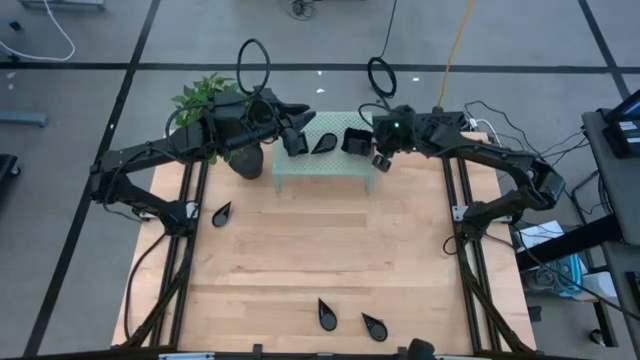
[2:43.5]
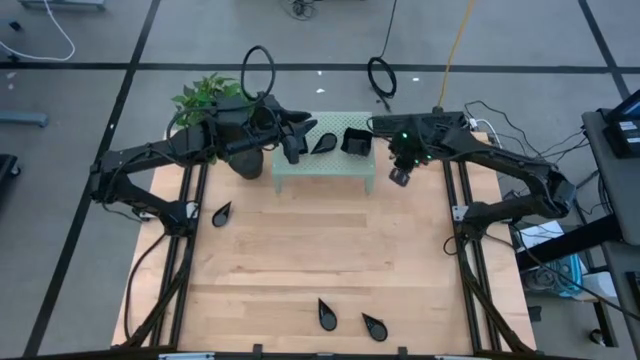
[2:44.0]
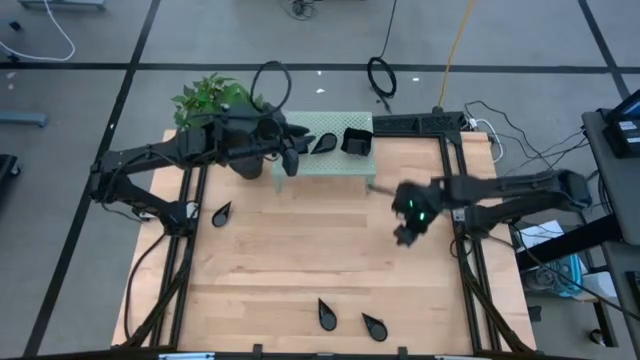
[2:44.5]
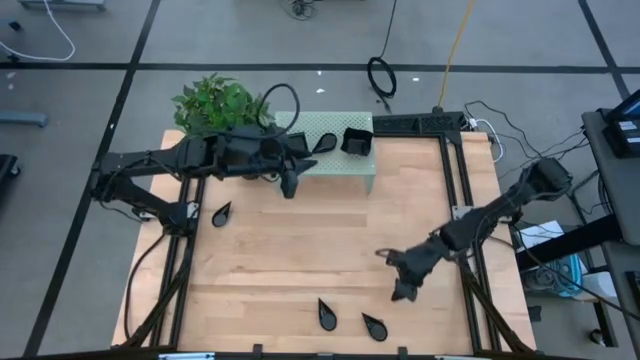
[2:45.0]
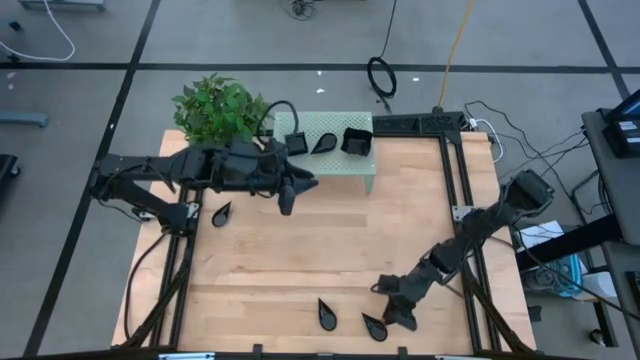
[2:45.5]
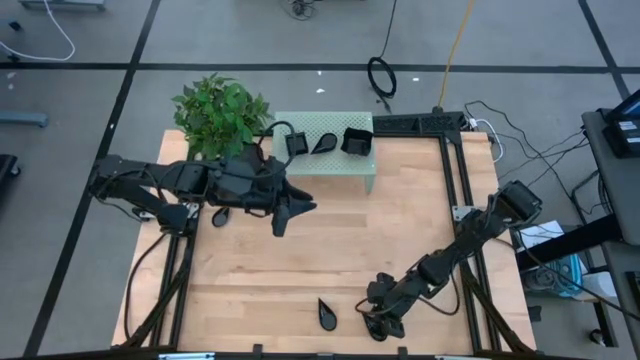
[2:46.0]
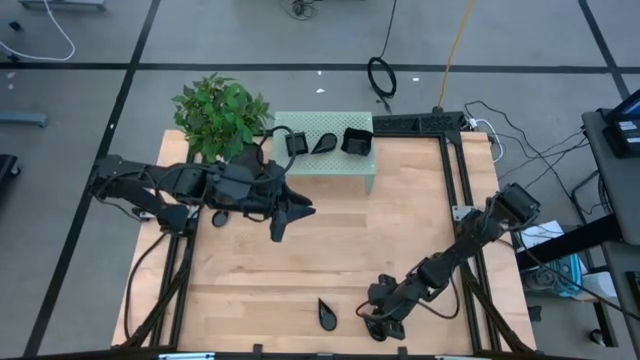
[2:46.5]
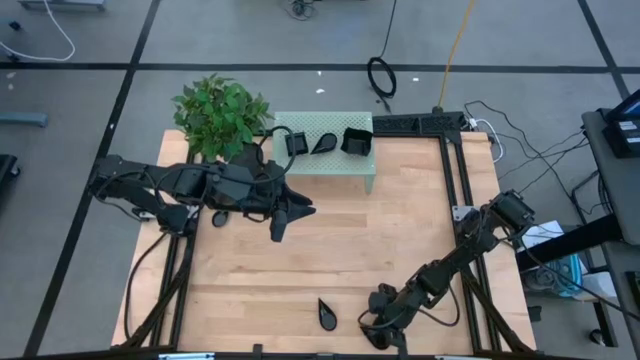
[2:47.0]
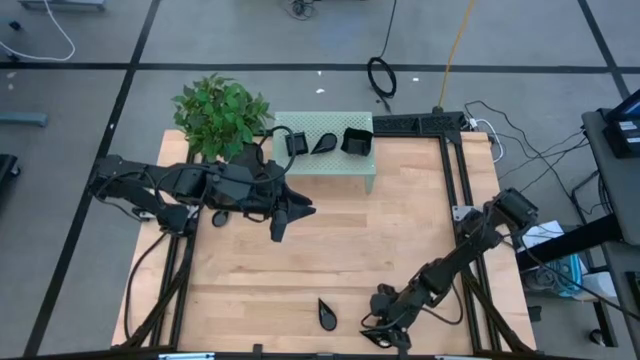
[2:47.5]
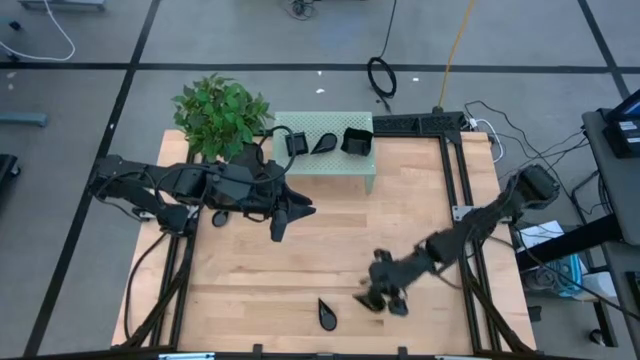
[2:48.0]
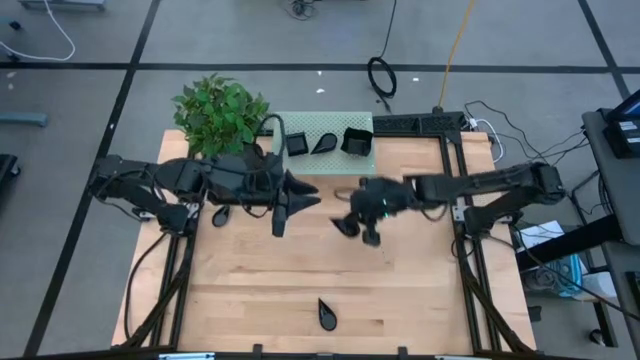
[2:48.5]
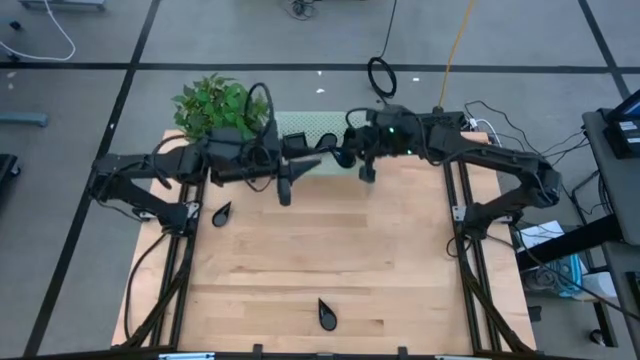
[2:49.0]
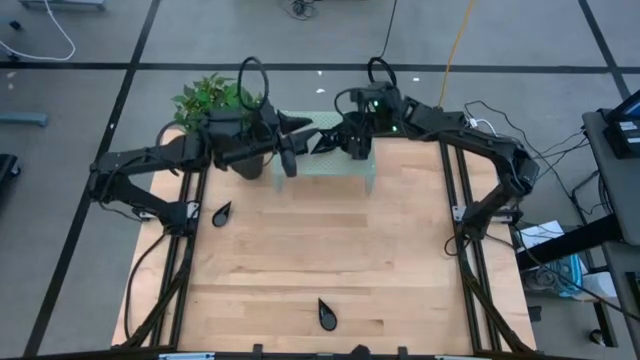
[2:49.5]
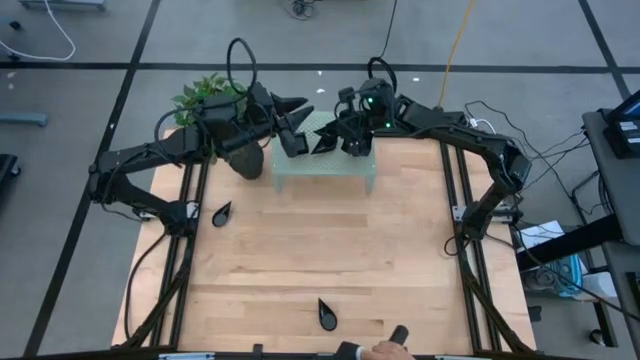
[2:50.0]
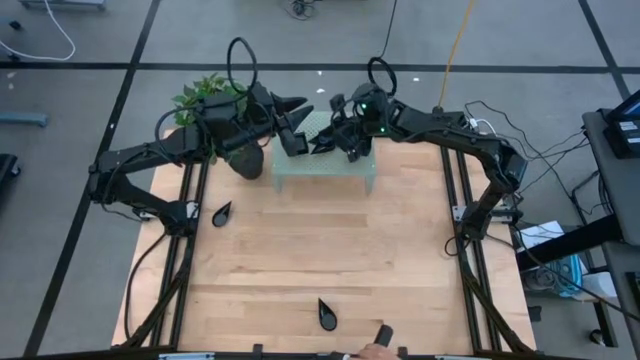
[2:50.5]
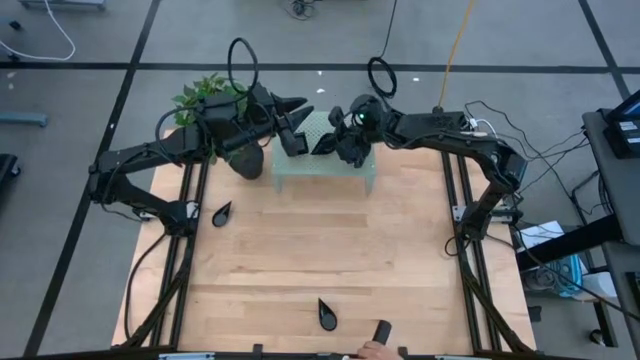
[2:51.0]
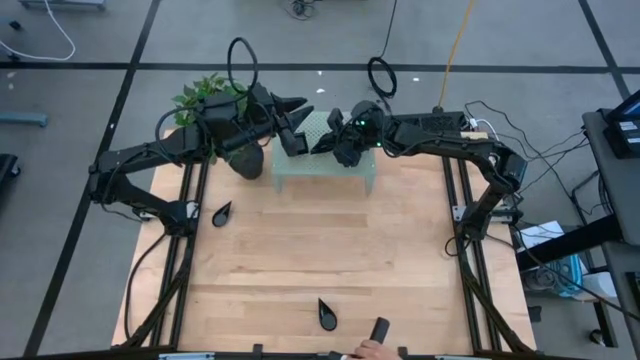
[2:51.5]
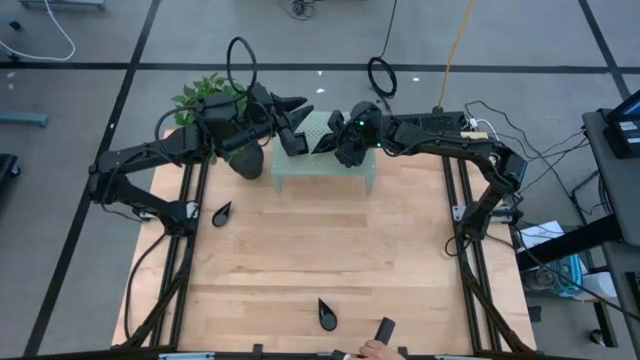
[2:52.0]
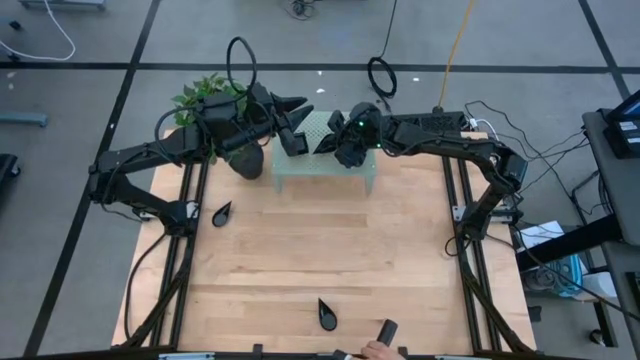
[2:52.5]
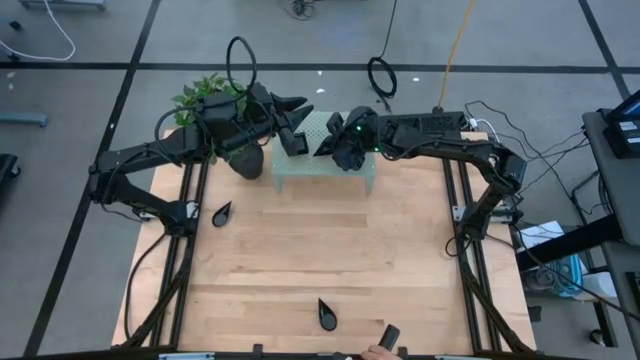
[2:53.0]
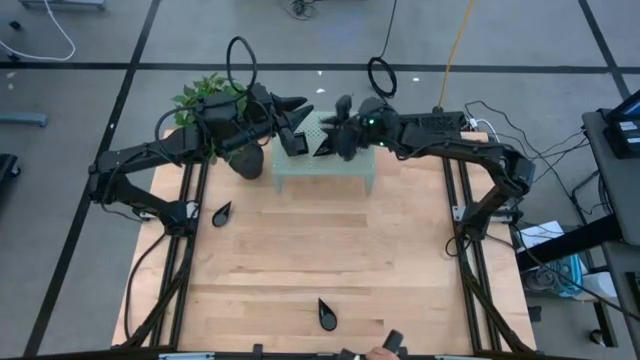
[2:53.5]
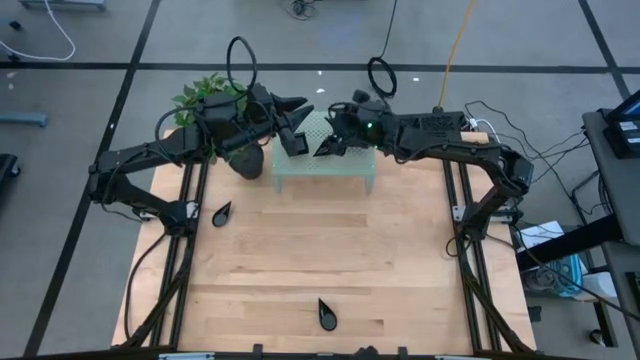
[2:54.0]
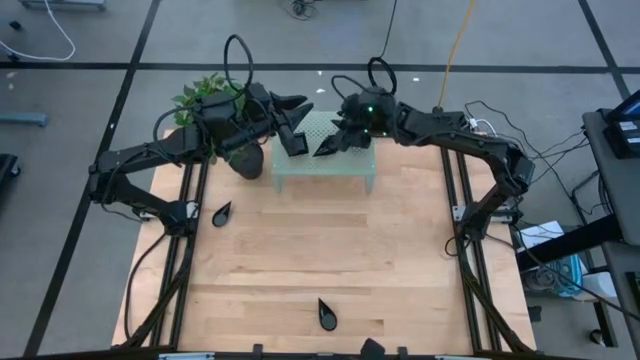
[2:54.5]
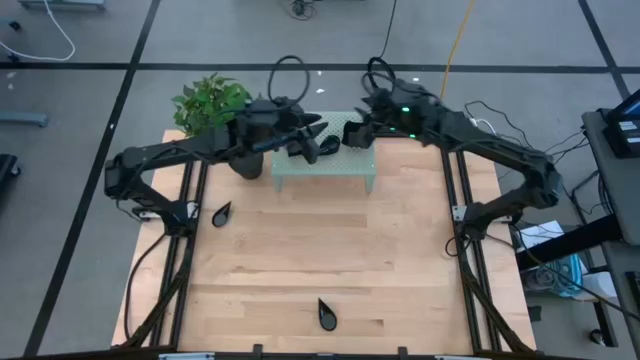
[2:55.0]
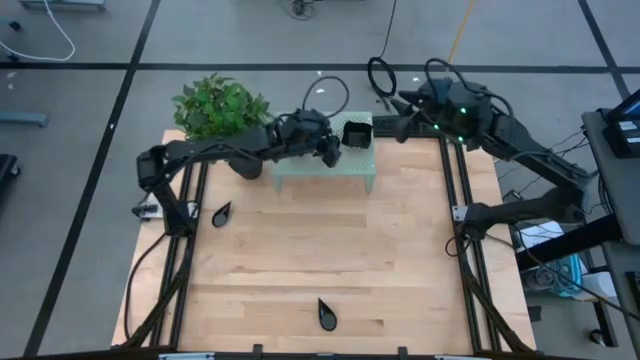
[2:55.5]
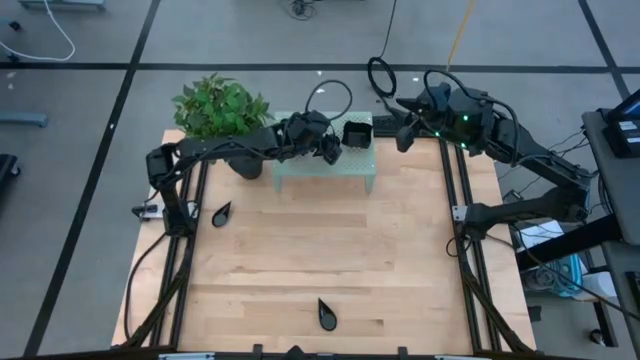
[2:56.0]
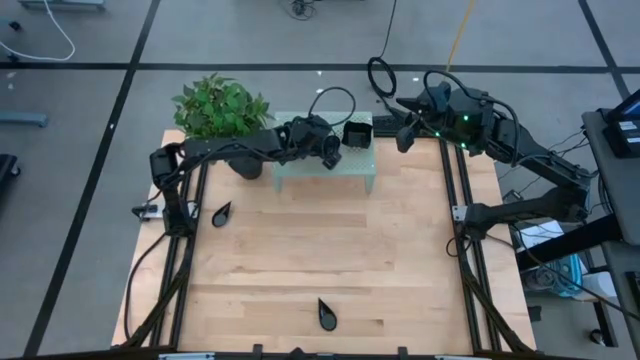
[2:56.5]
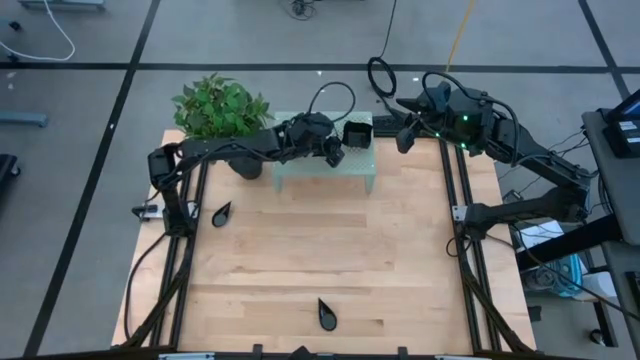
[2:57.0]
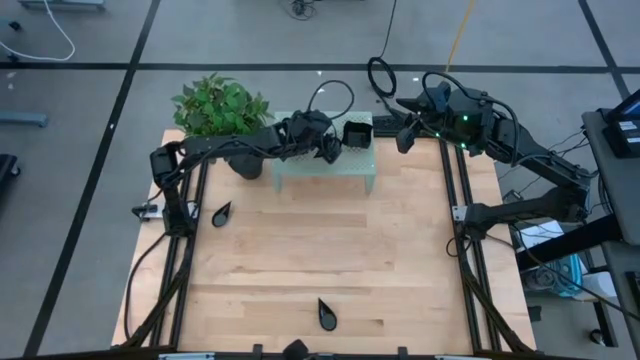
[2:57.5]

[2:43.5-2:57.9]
Task: Pick & Place Mini shaped plates
Stack the drop shaped plate on top of the other drop shaped plate on the shelf

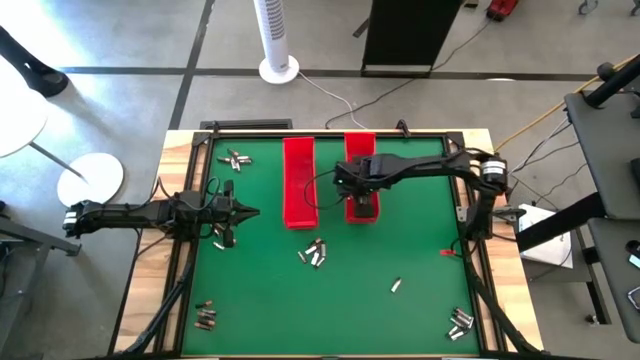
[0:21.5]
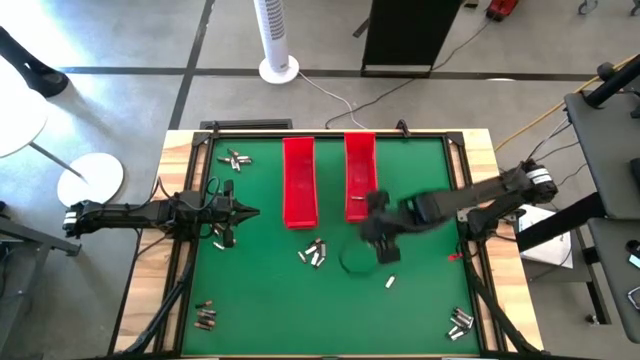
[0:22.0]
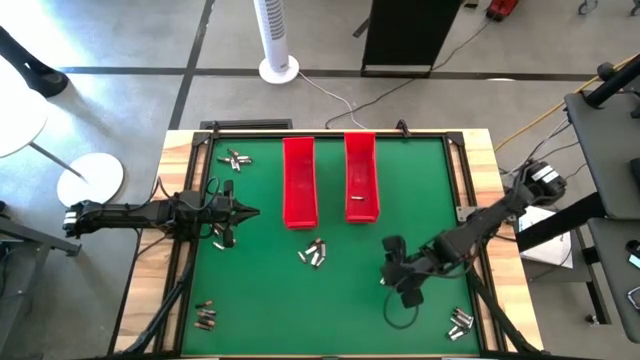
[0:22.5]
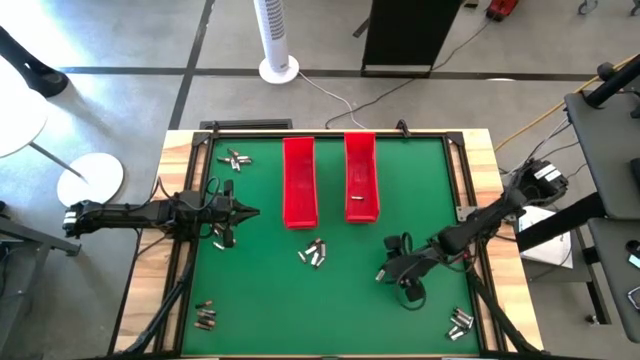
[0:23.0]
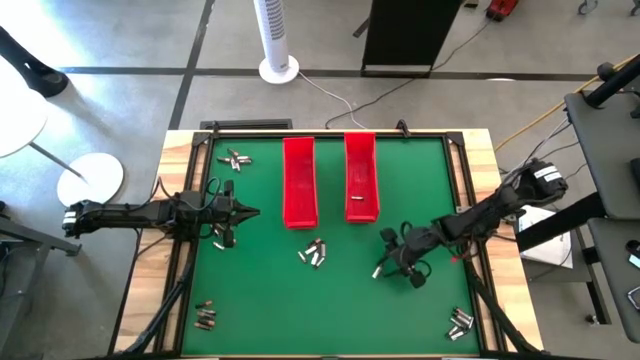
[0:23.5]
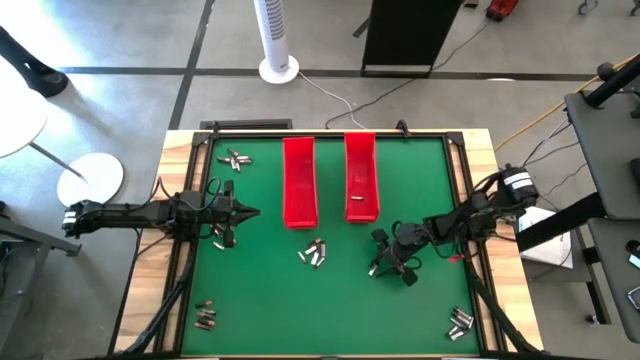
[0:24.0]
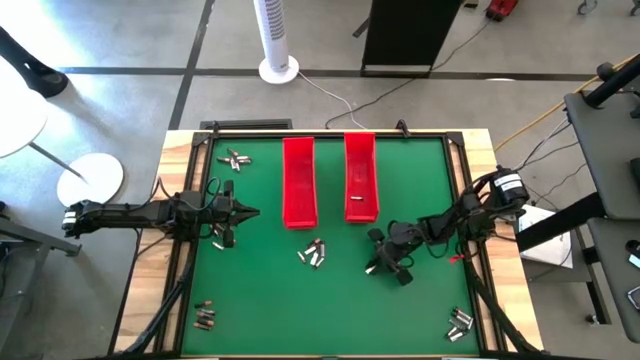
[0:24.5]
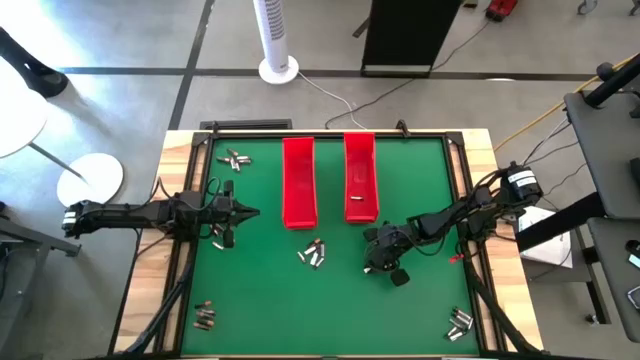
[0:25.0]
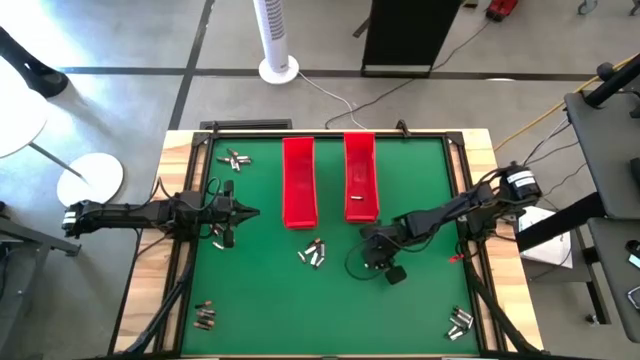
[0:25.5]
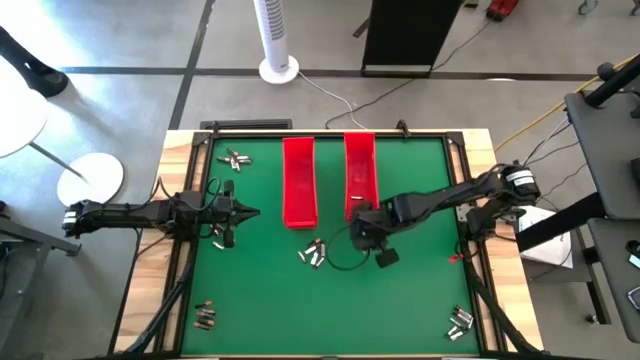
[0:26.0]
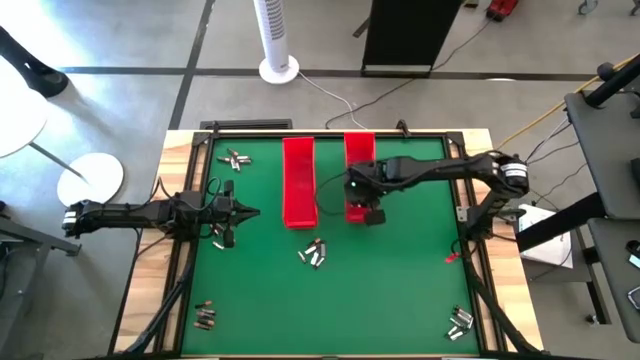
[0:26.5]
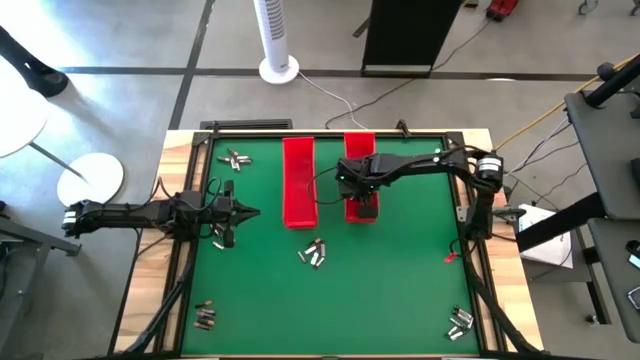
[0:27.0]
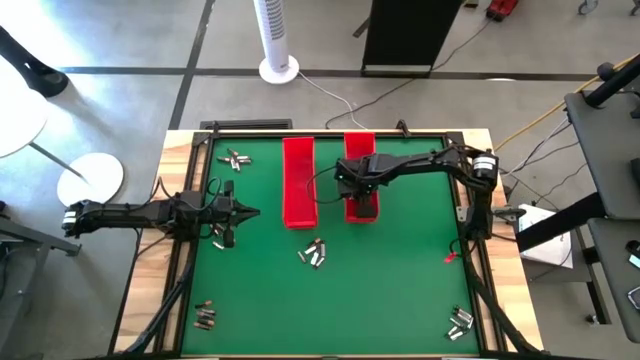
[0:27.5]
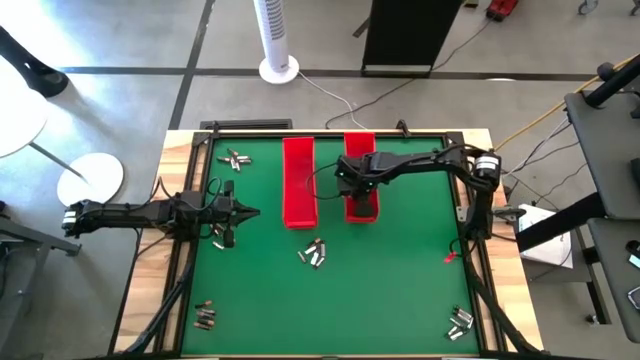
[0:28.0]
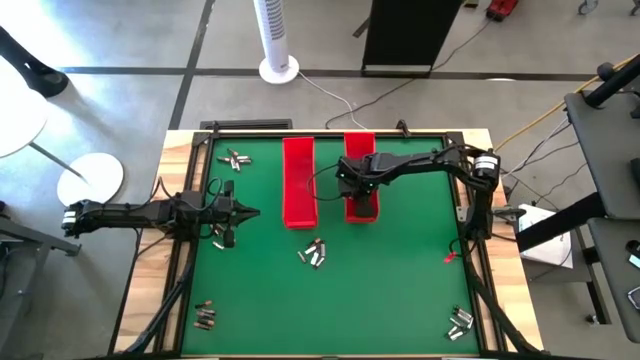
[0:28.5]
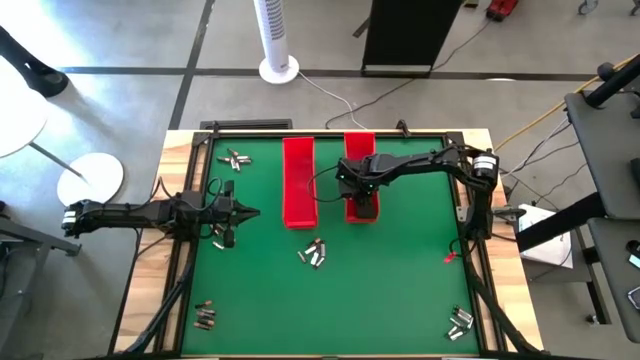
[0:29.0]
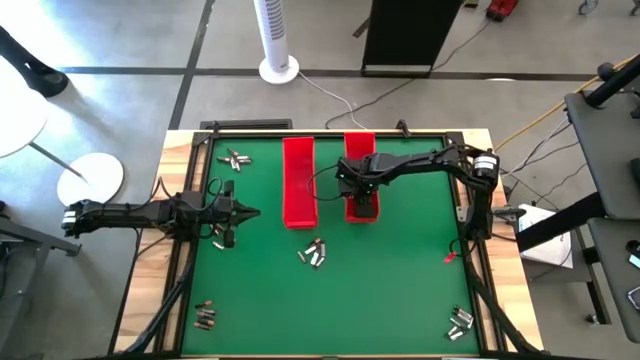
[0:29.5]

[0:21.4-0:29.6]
Task: Sort batteries
Put the silver battery into the right red bin
